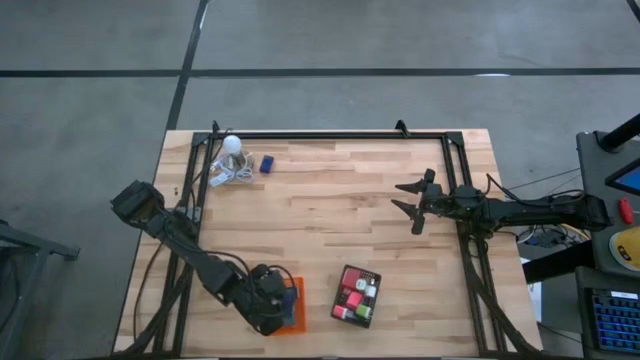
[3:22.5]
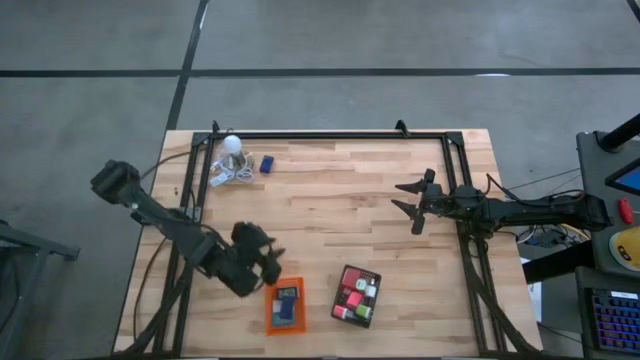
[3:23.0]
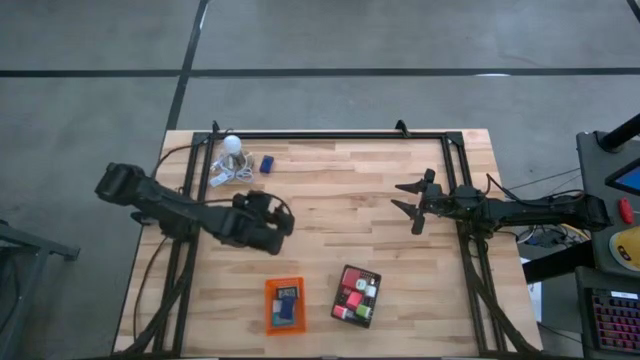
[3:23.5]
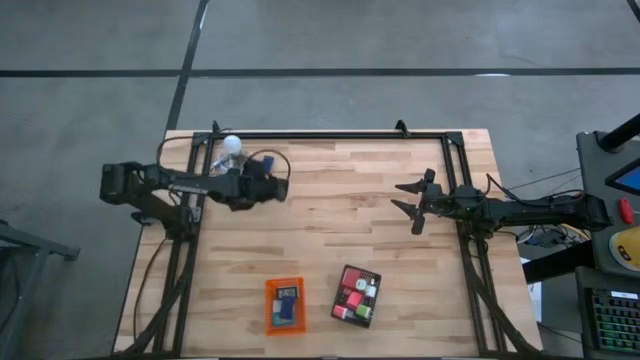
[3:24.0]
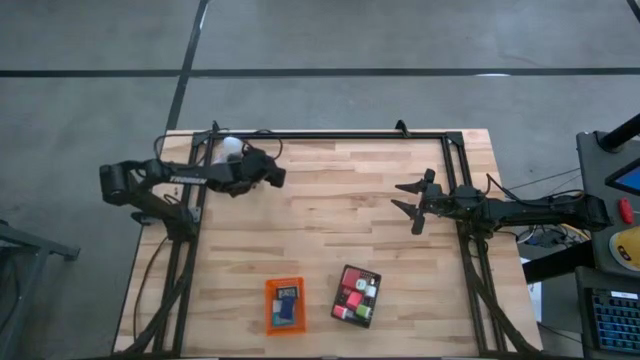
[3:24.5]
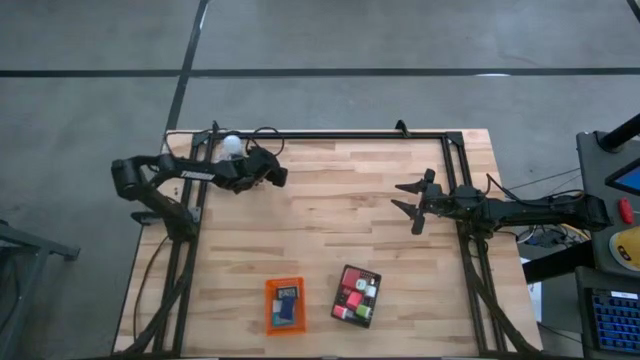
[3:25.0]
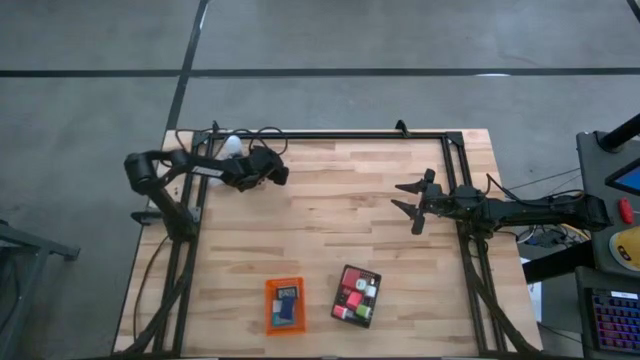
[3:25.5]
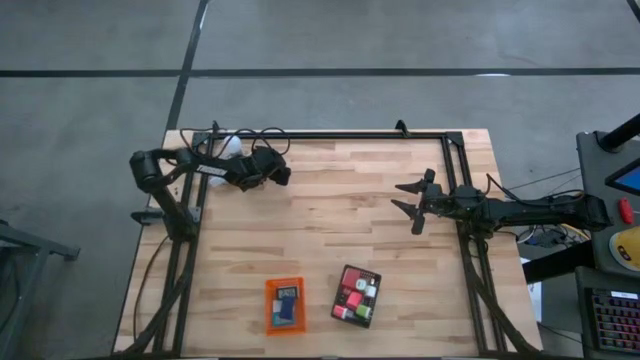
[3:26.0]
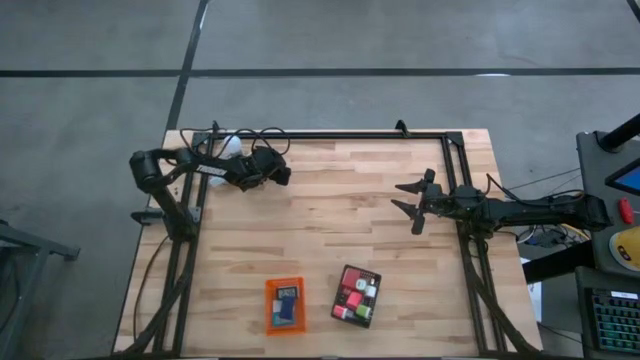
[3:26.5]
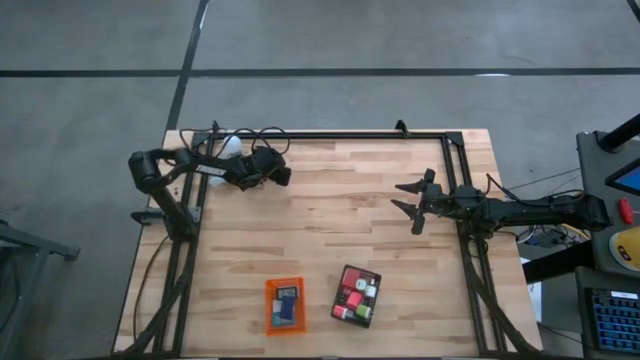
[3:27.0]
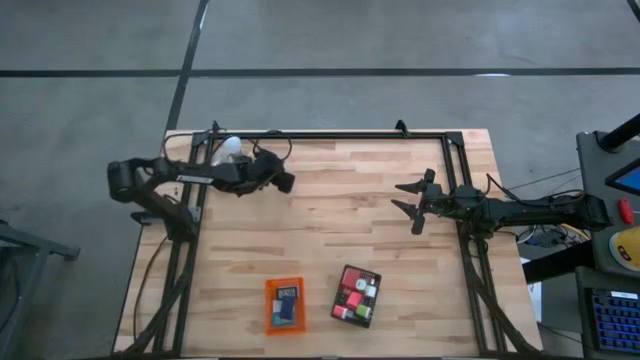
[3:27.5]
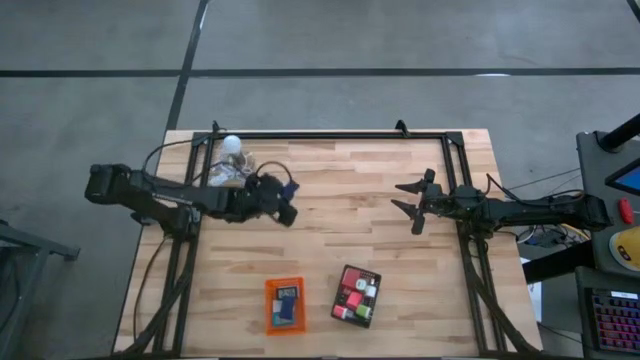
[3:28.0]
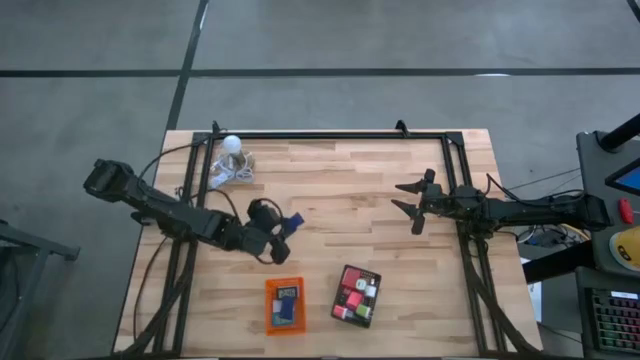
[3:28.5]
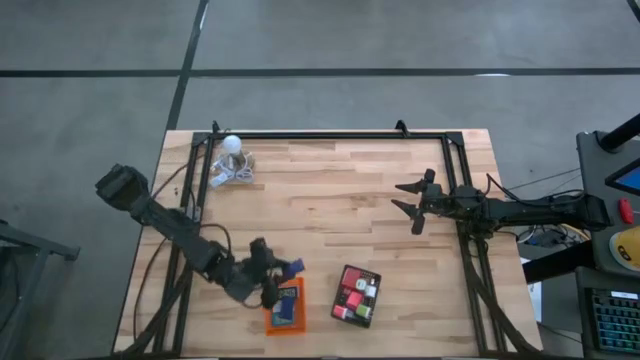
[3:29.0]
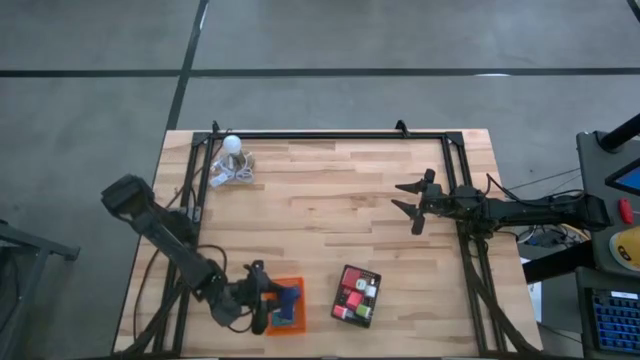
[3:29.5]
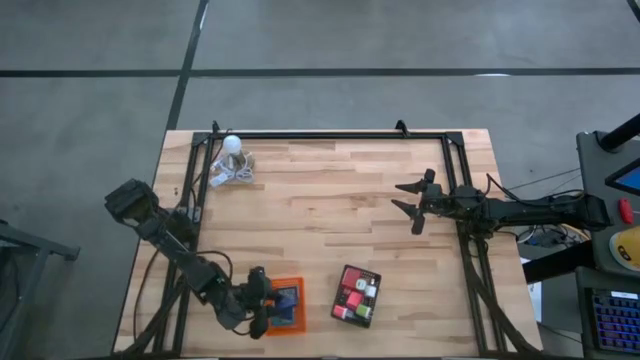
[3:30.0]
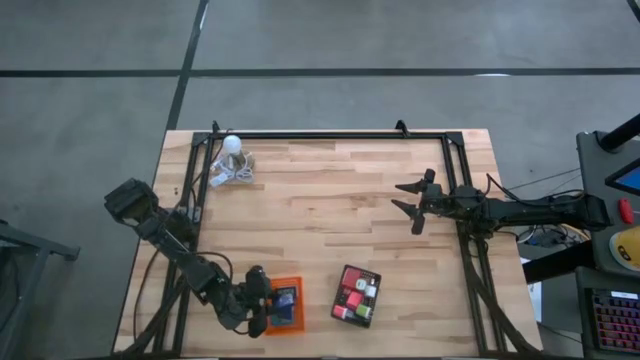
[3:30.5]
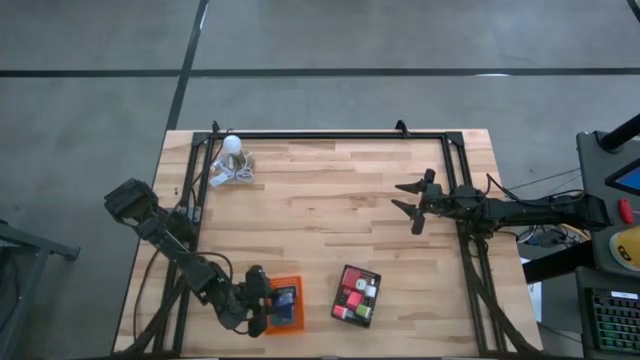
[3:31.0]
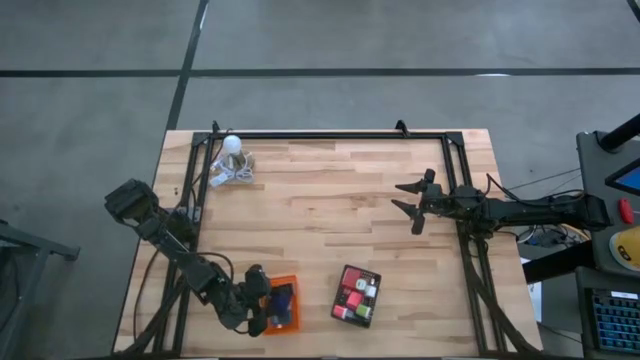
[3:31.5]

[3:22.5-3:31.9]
Task: Pick & Place Office items
Put the dark blue timer into the orange bin

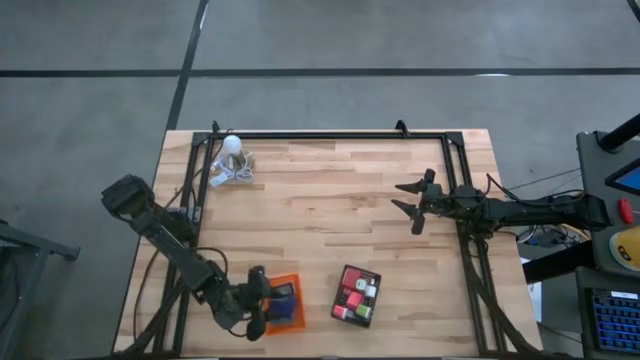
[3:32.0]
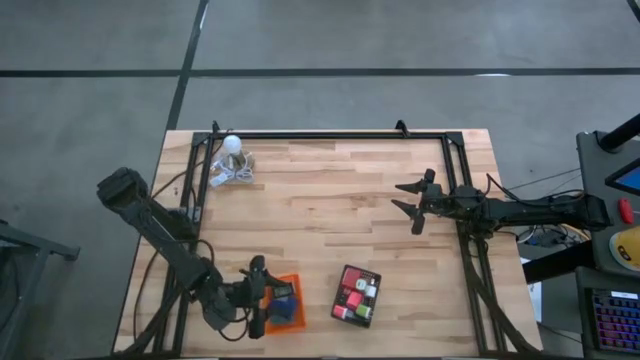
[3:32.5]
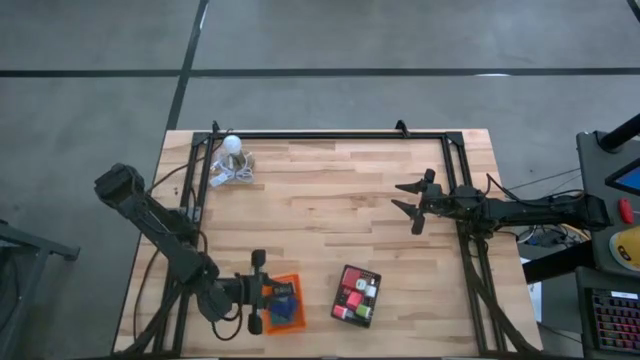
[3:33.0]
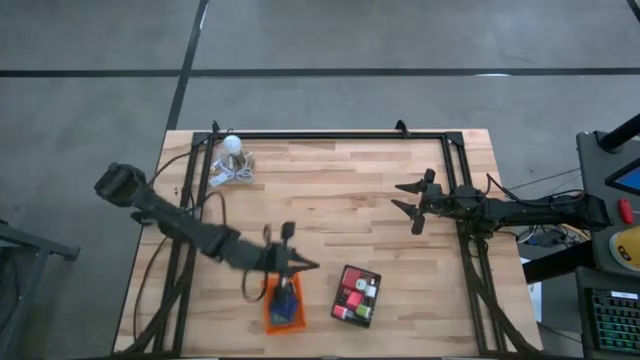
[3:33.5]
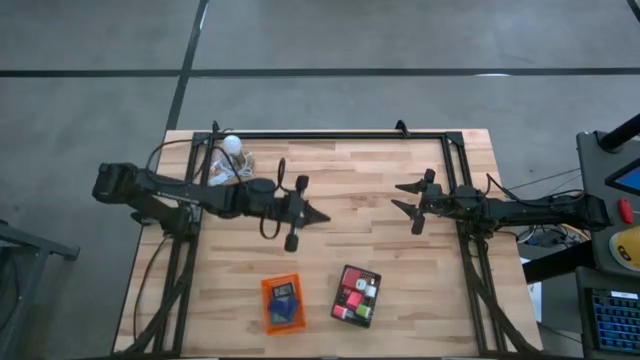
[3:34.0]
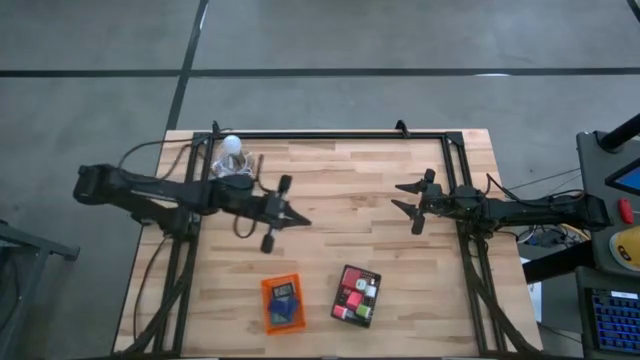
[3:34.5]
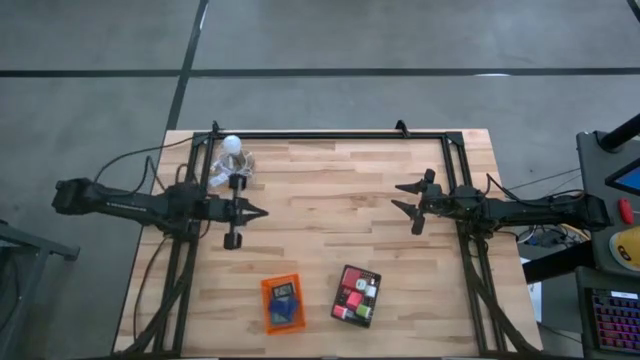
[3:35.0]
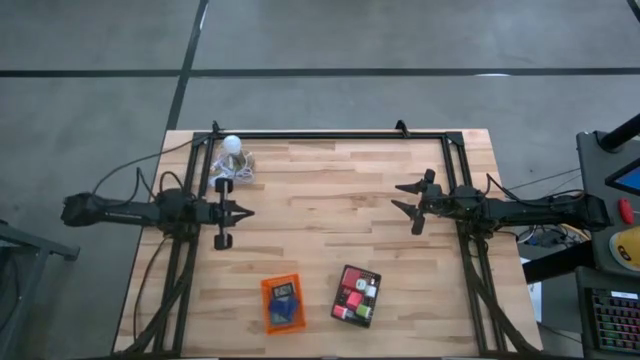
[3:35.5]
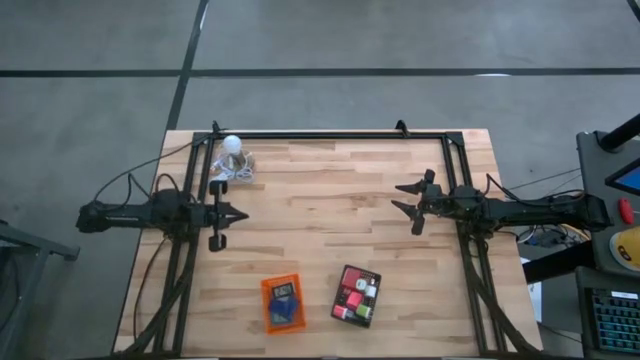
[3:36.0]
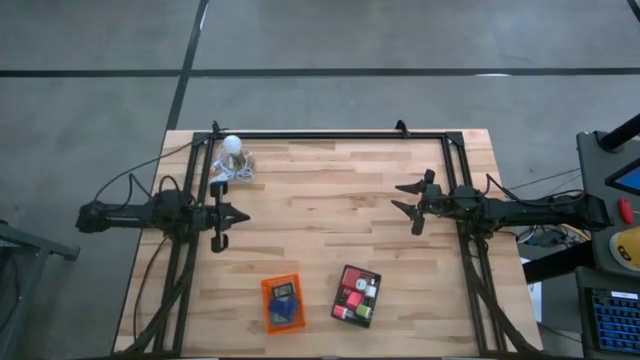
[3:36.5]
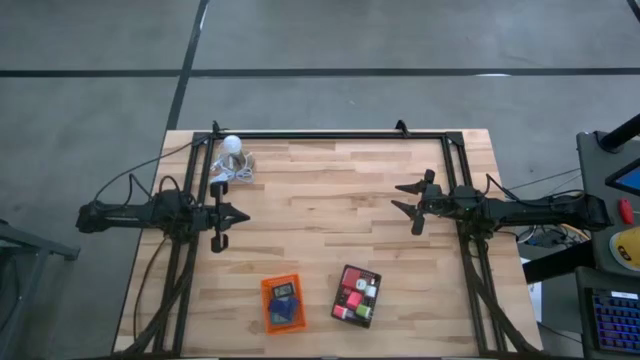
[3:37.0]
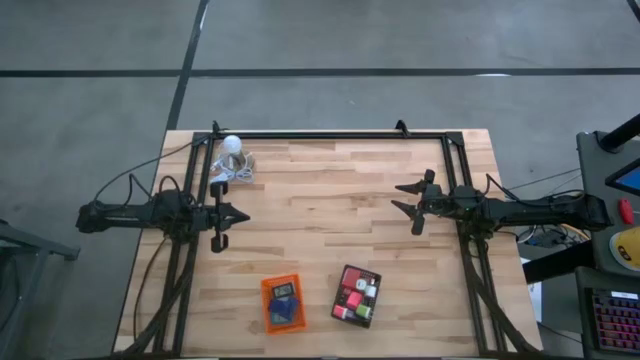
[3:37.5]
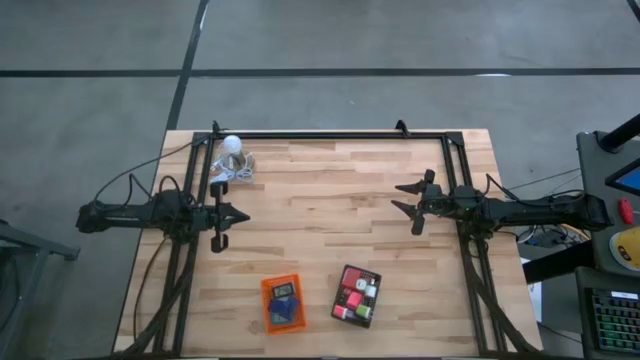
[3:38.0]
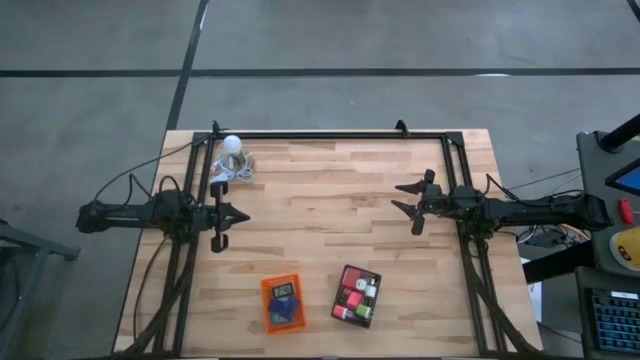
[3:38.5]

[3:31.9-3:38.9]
Return to Home Position
